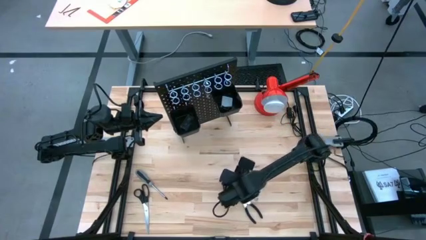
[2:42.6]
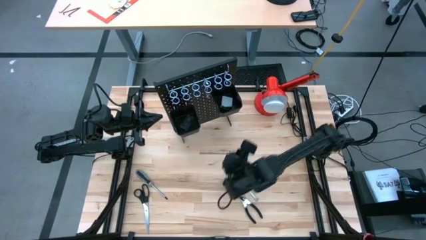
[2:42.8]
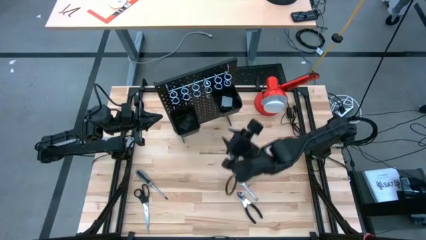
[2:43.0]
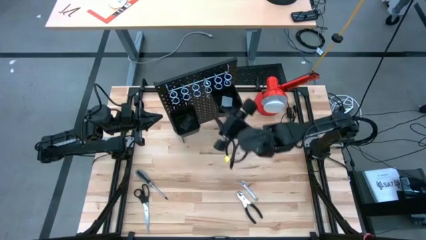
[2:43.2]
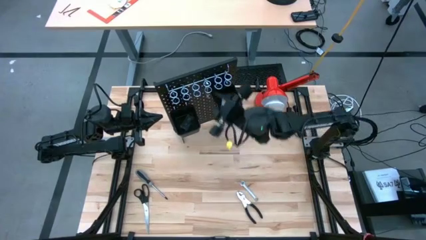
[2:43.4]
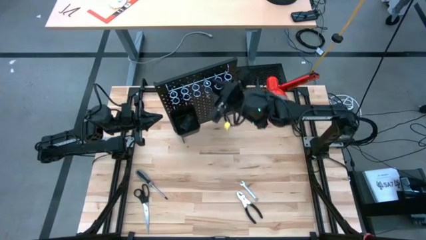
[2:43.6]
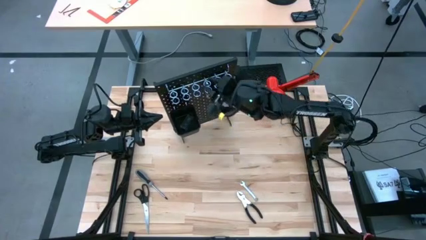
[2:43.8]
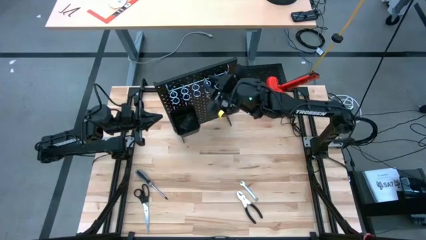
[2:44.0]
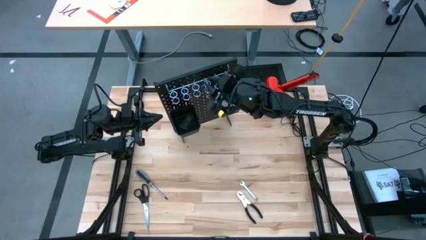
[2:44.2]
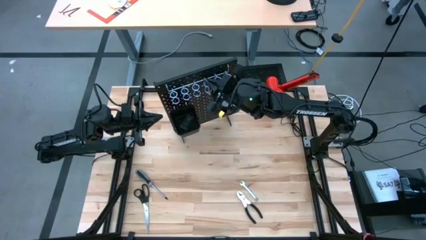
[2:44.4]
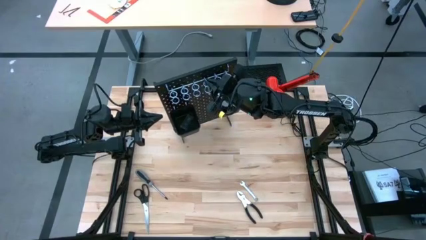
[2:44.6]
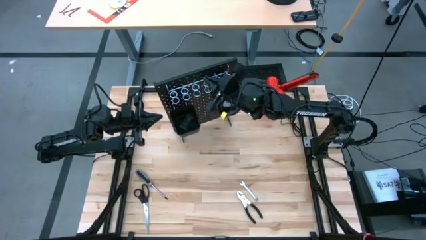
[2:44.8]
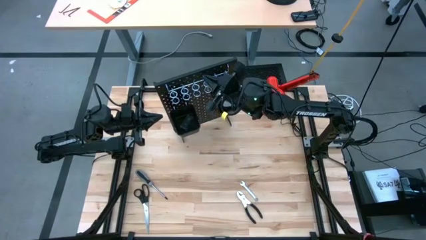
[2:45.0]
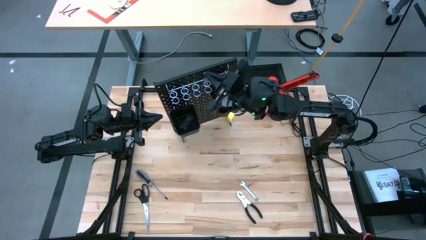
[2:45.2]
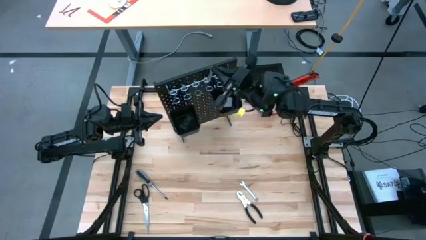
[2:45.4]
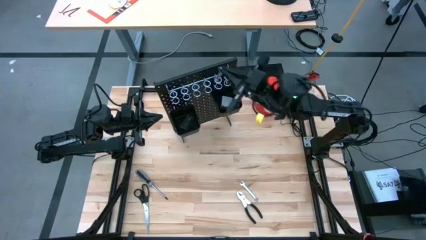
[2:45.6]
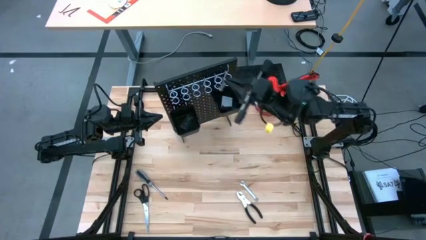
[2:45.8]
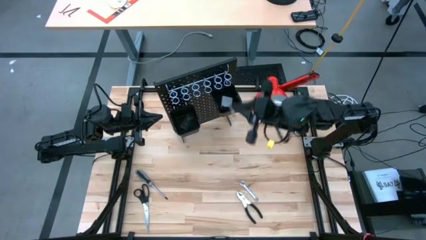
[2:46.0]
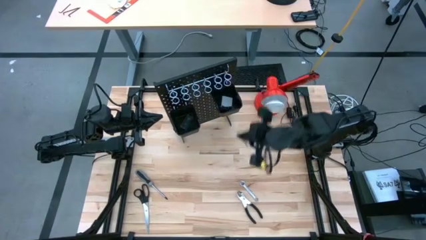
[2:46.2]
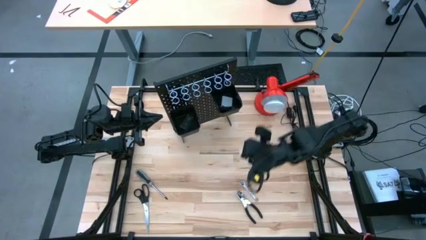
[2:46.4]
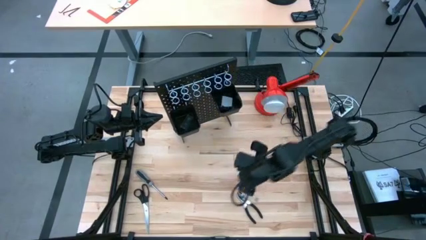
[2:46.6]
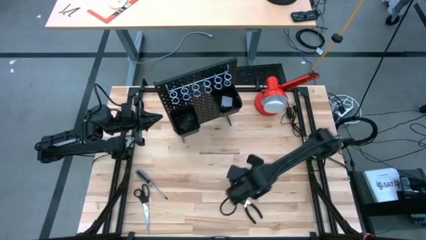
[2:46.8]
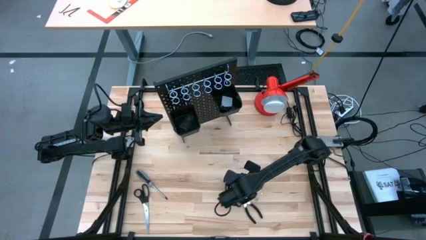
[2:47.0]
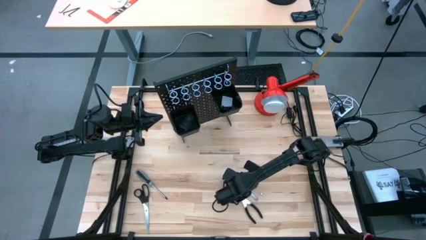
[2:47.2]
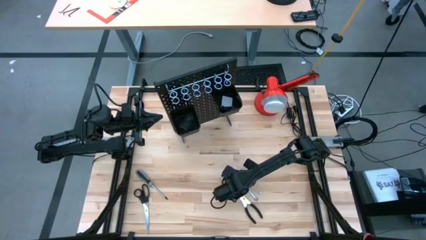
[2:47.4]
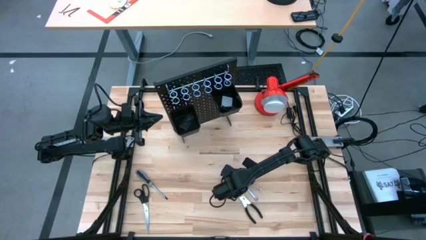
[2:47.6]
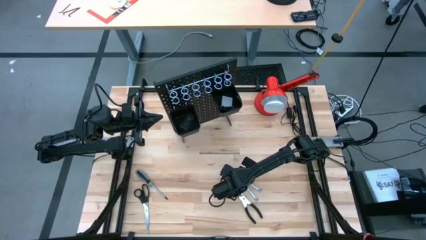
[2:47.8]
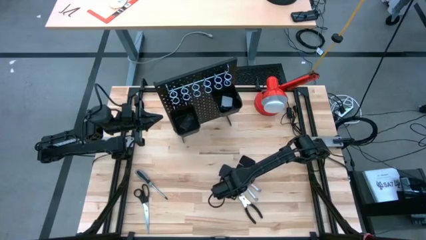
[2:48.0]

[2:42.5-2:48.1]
Task: Hang tools onto peg board
Unhang the left wrench from the pegboard to the table

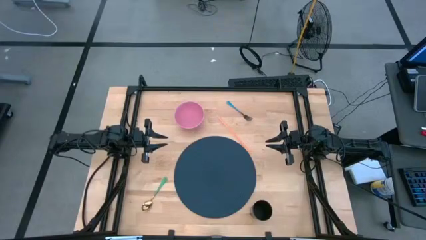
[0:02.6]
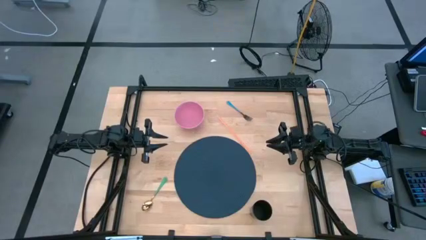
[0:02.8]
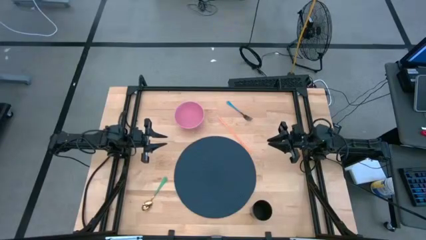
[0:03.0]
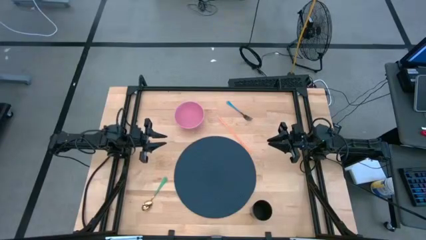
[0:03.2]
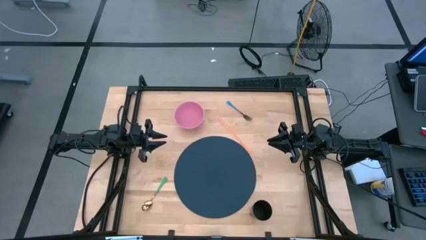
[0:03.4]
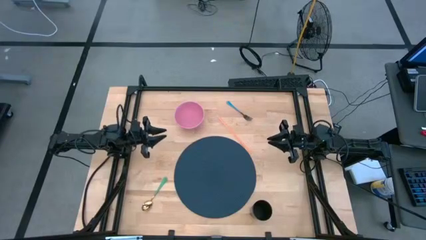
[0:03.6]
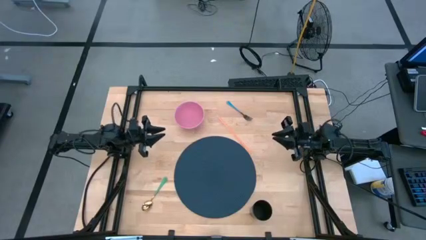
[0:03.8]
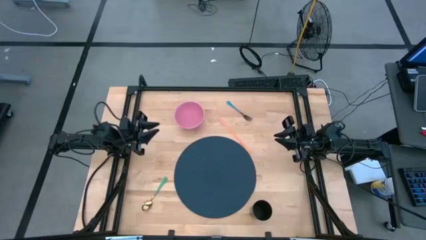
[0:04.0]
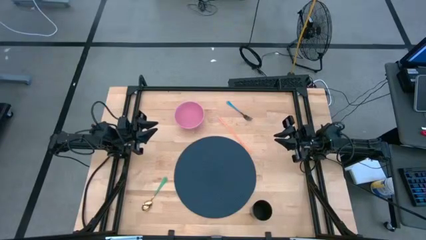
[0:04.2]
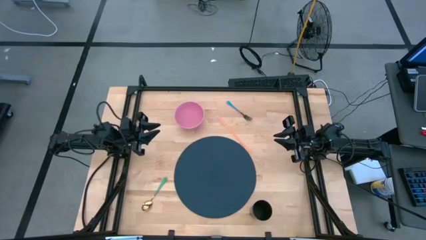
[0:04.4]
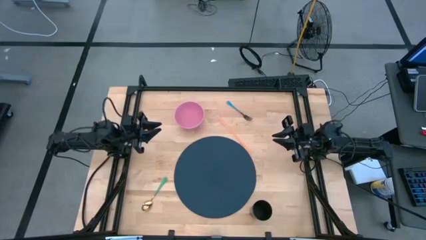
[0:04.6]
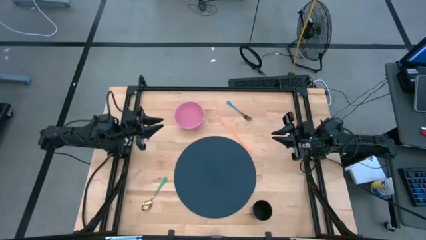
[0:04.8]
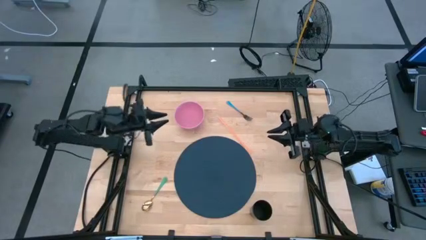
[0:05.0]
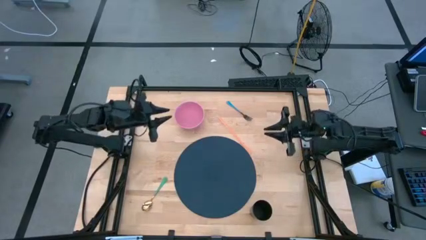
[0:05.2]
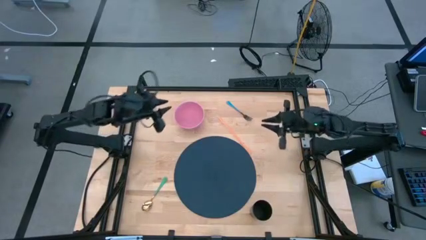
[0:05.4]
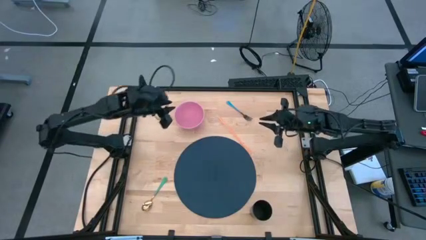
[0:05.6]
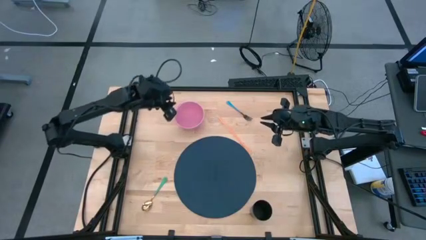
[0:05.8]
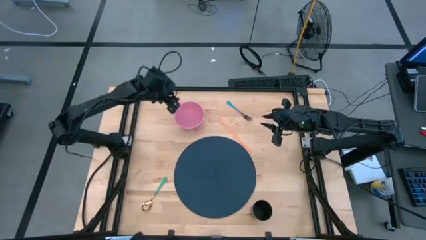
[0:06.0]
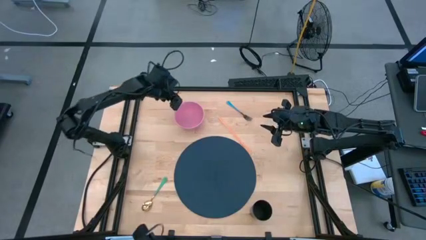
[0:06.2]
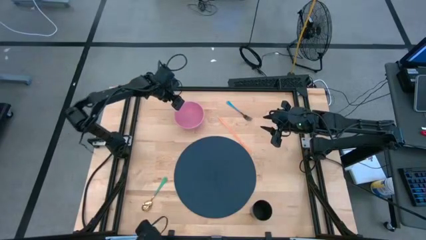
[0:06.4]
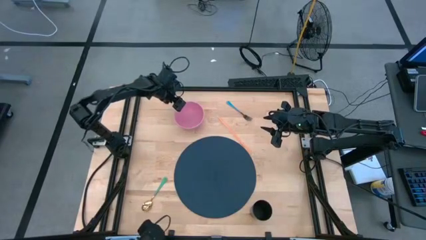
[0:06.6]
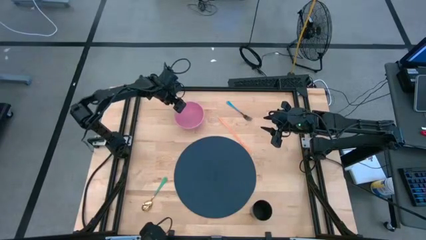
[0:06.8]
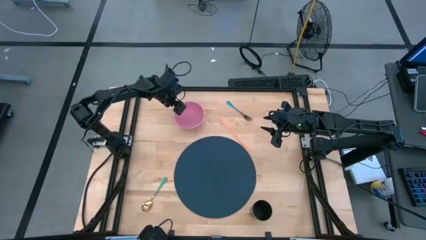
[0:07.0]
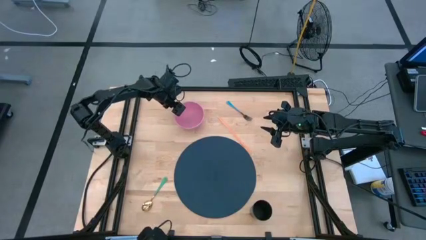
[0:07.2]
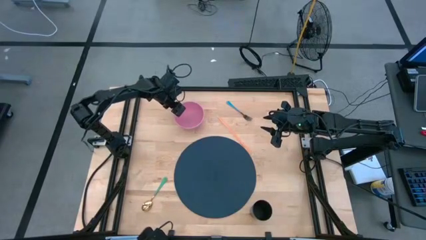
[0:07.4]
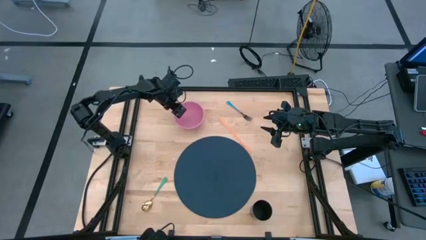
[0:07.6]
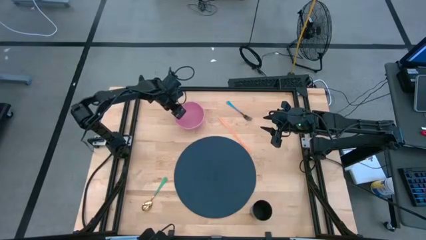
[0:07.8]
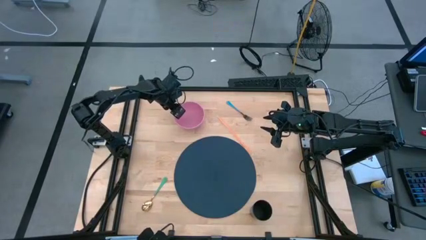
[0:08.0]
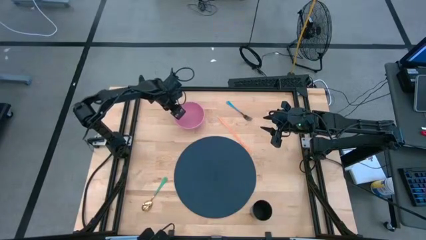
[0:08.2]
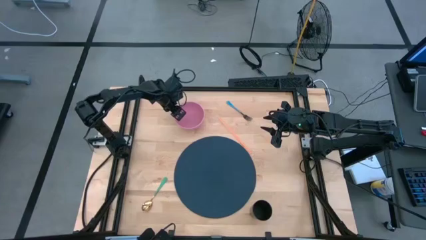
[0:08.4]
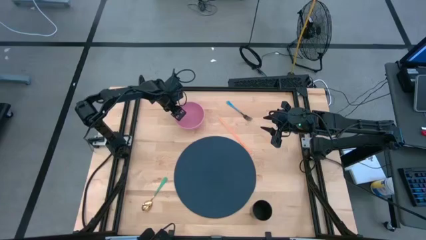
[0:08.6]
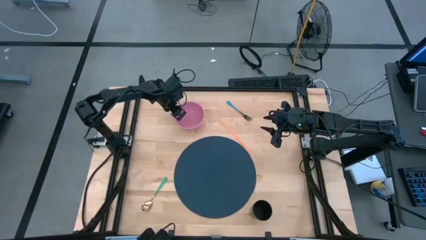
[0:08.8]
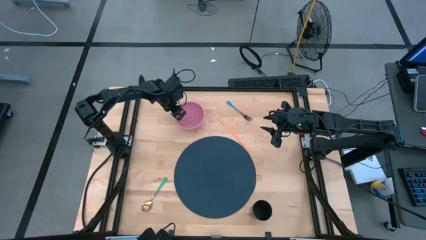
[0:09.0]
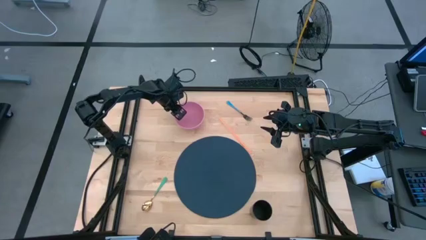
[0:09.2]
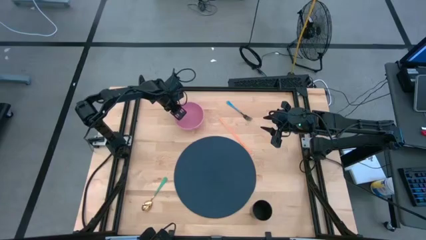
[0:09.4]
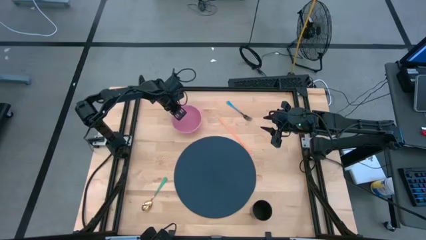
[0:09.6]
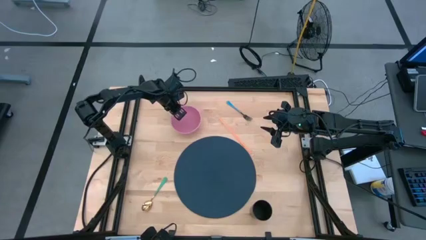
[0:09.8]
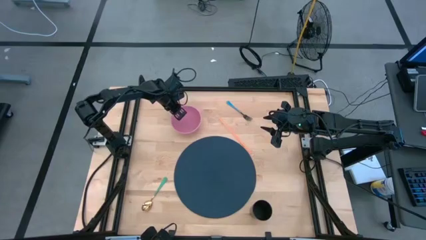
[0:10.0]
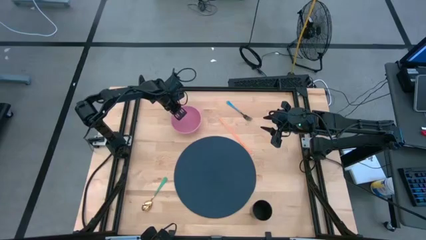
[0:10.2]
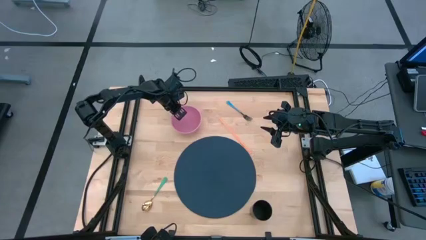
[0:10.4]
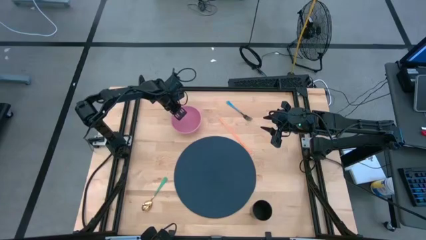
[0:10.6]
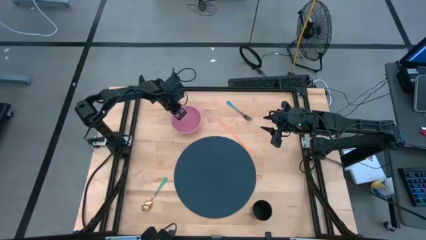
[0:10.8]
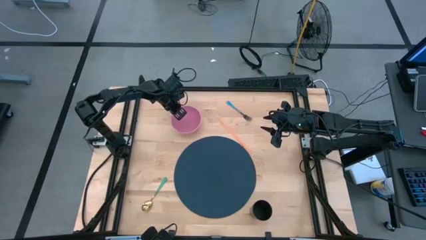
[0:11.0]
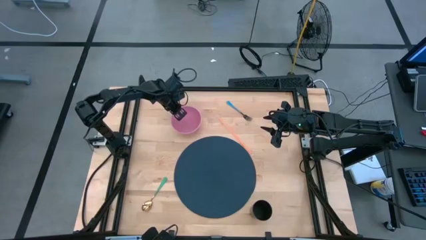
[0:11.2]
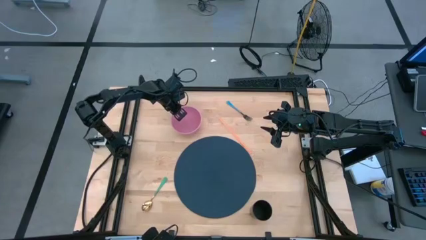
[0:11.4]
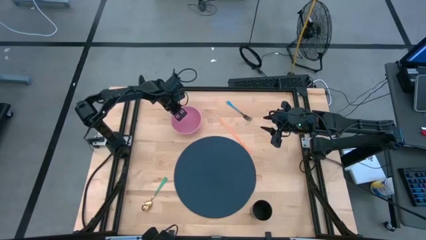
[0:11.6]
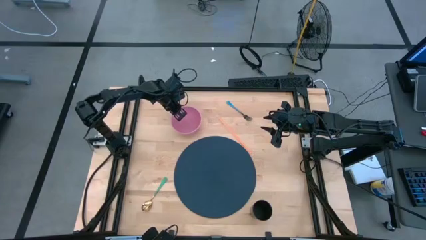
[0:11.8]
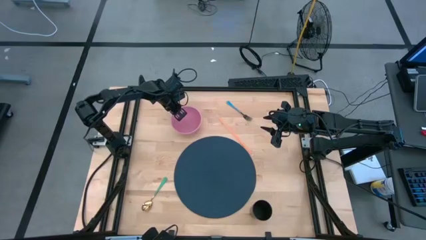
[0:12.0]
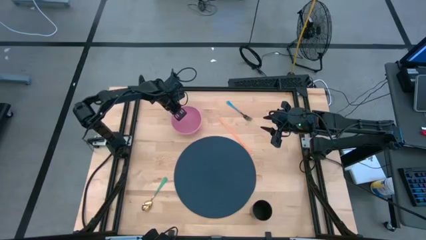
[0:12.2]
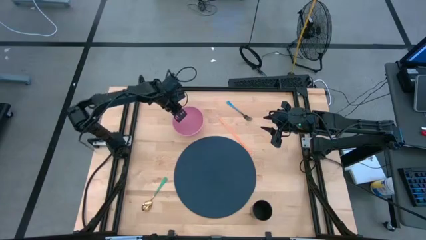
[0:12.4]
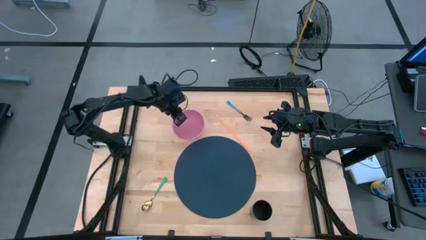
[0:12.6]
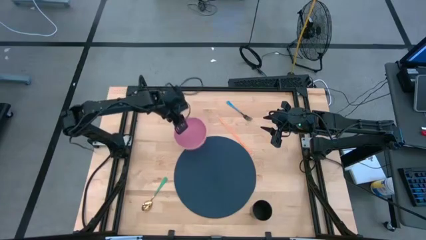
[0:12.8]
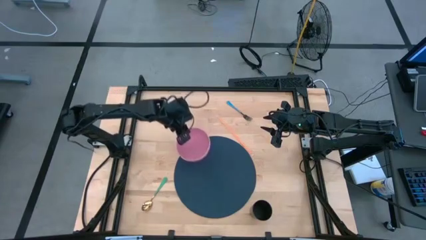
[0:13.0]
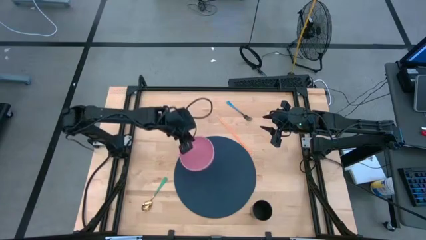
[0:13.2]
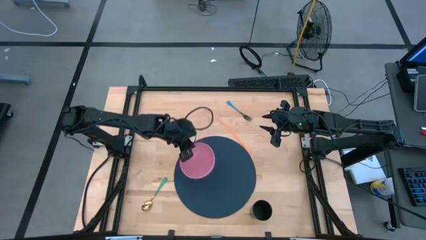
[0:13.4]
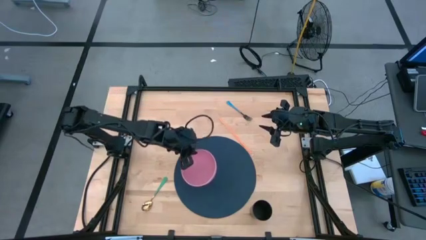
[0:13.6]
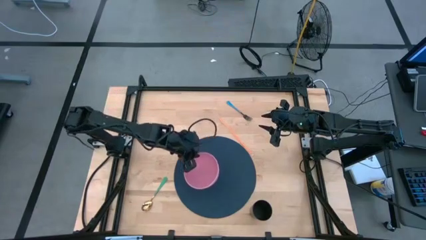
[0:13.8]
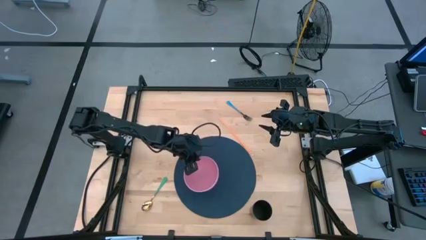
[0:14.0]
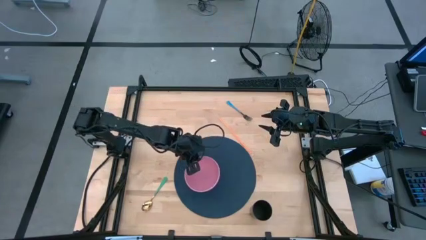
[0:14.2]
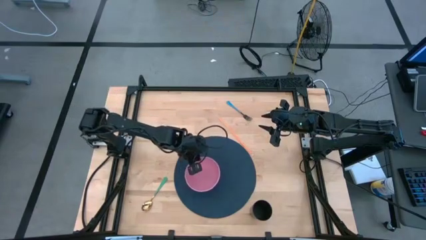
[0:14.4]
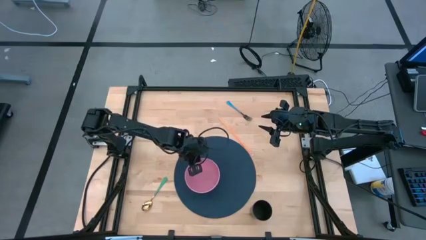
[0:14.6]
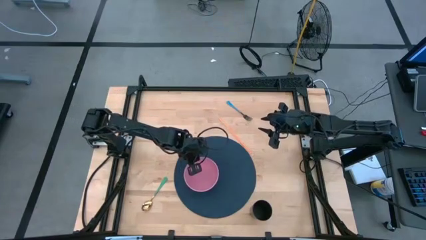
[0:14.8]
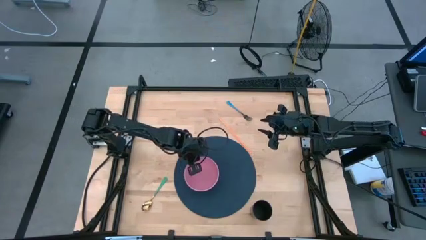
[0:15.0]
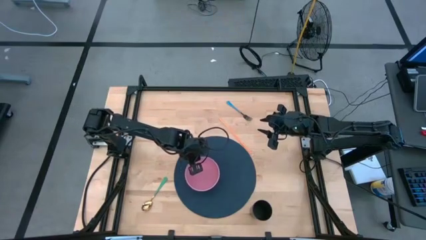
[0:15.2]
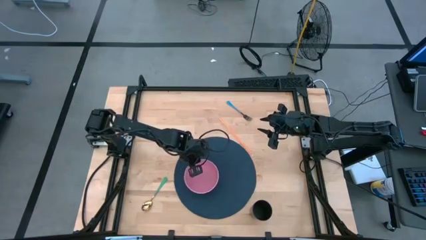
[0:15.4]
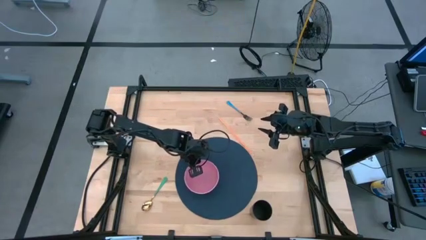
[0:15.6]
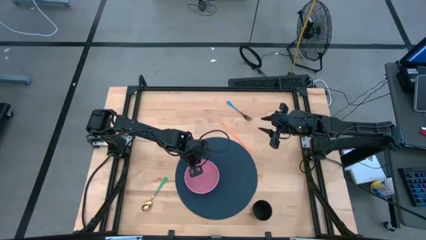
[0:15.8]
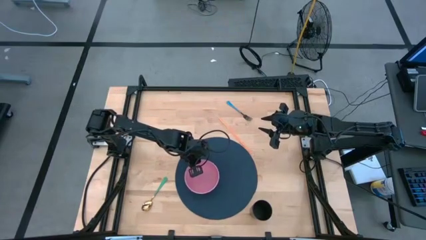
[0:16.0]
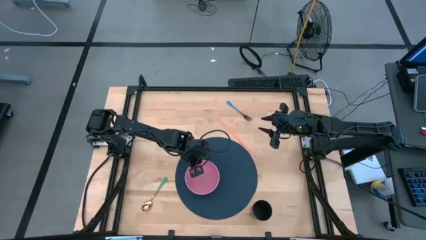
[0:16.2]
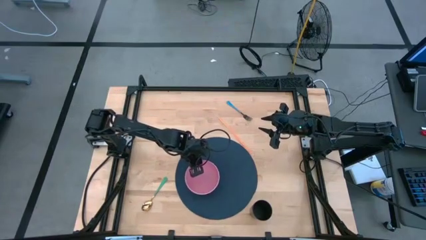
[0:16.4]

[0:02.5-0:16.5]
Task: Pick & Place Utensil
Put the pink bowl on the blue mat
